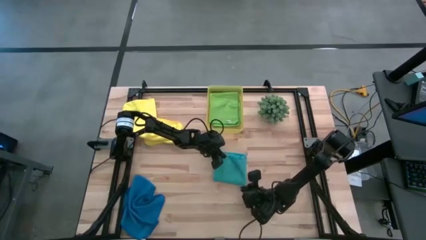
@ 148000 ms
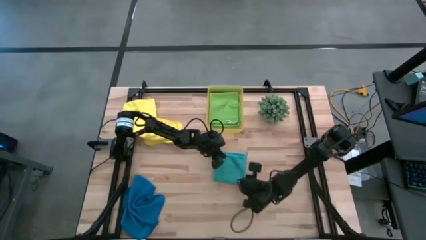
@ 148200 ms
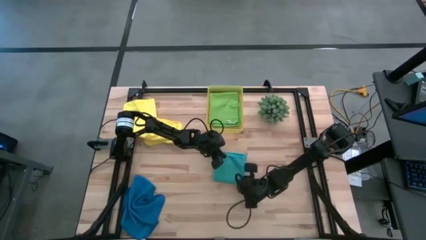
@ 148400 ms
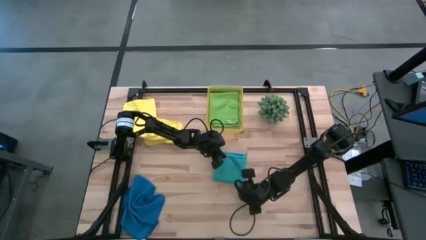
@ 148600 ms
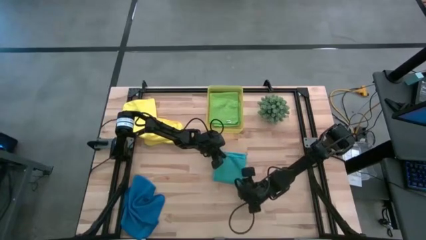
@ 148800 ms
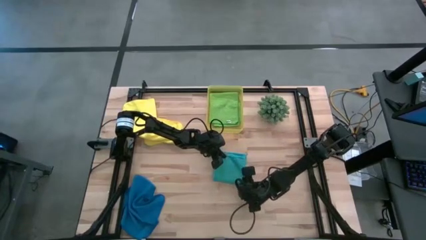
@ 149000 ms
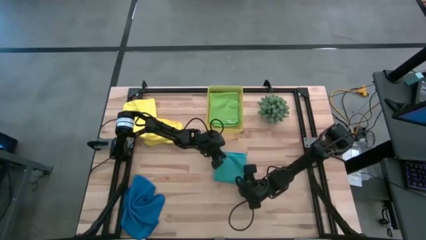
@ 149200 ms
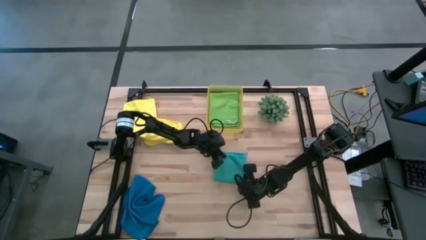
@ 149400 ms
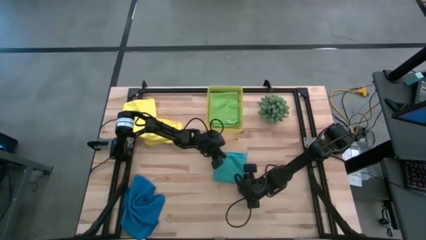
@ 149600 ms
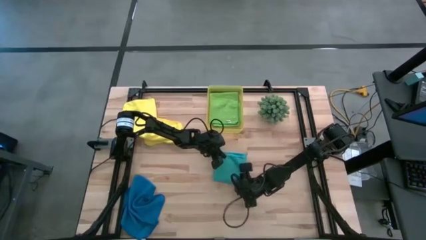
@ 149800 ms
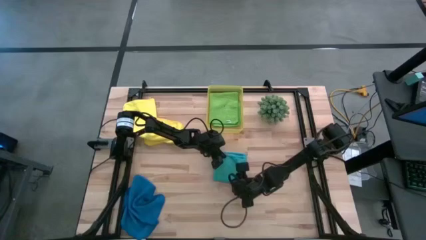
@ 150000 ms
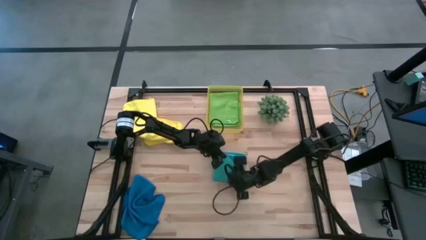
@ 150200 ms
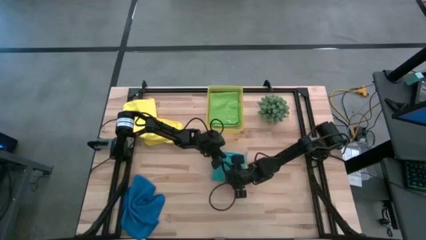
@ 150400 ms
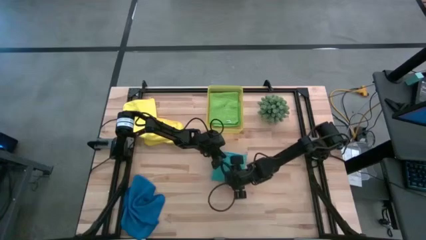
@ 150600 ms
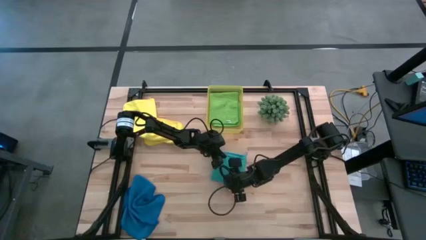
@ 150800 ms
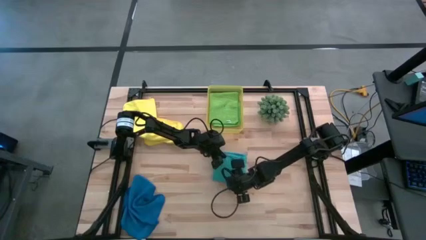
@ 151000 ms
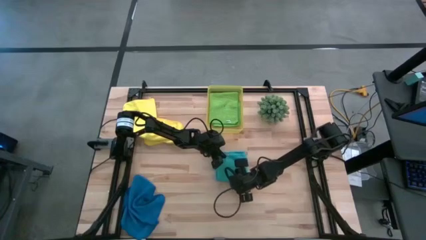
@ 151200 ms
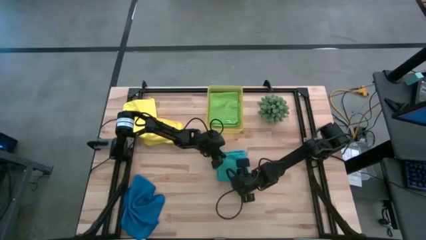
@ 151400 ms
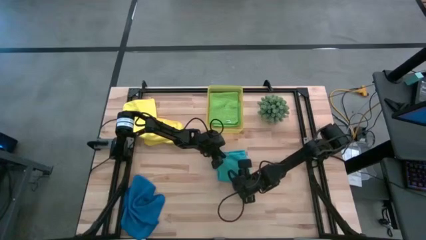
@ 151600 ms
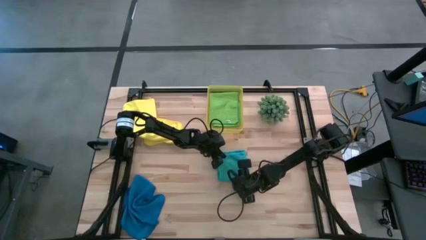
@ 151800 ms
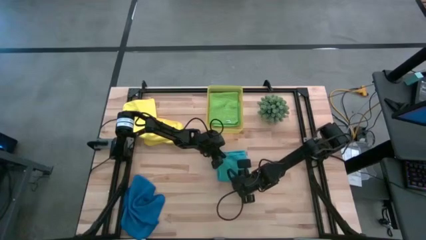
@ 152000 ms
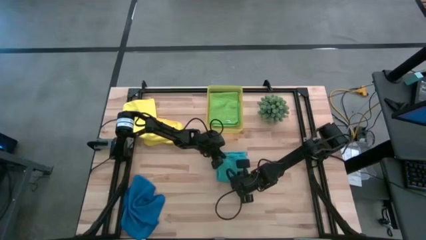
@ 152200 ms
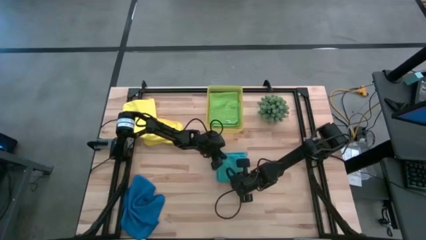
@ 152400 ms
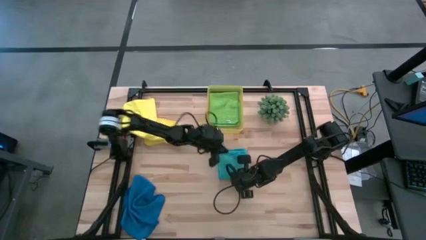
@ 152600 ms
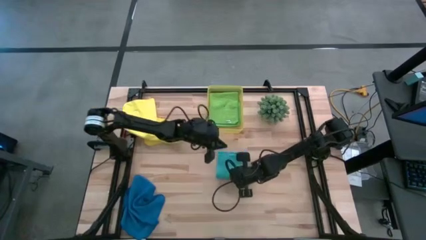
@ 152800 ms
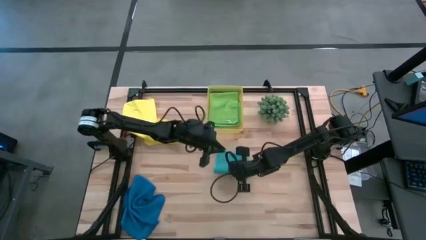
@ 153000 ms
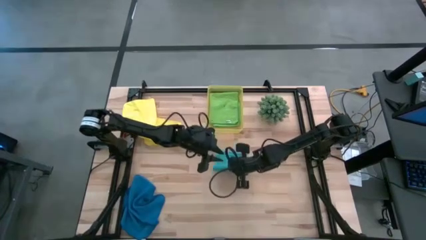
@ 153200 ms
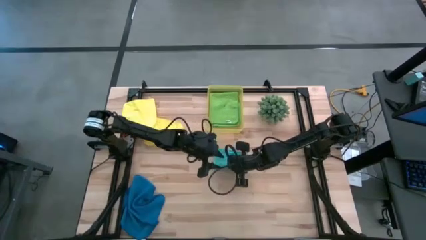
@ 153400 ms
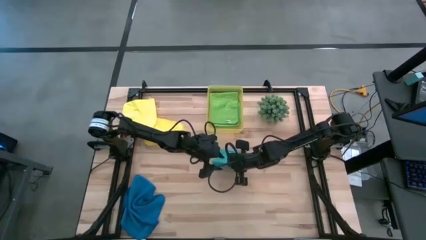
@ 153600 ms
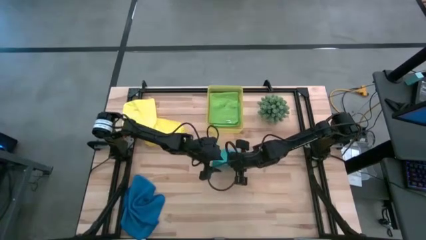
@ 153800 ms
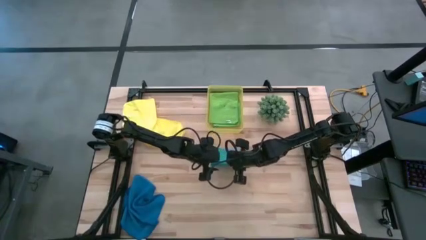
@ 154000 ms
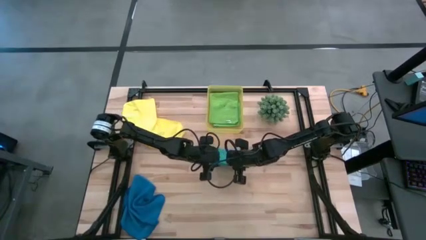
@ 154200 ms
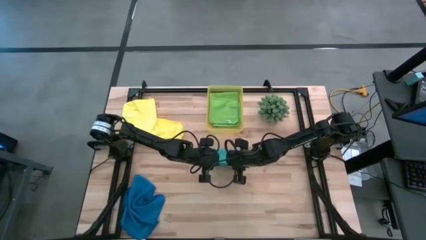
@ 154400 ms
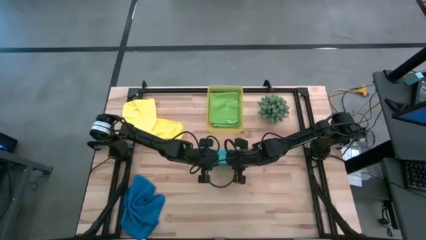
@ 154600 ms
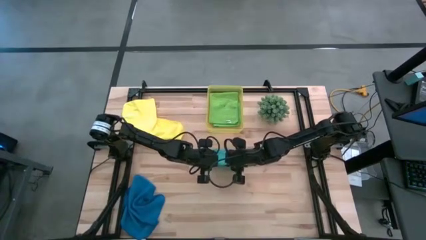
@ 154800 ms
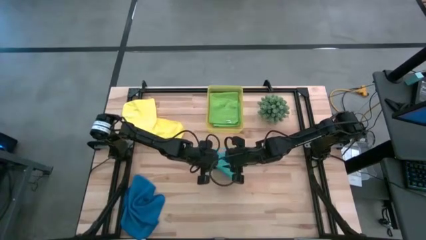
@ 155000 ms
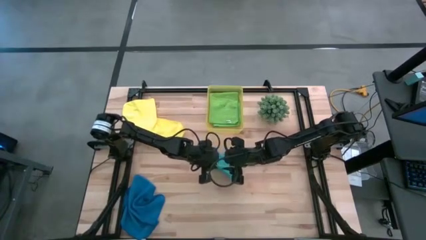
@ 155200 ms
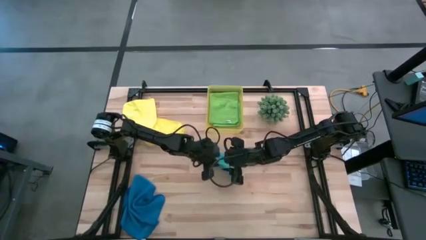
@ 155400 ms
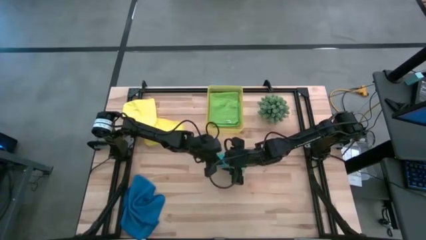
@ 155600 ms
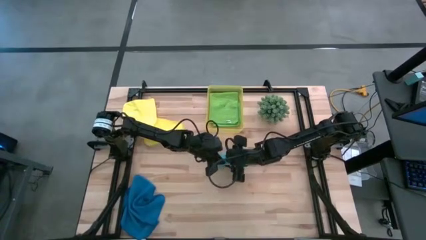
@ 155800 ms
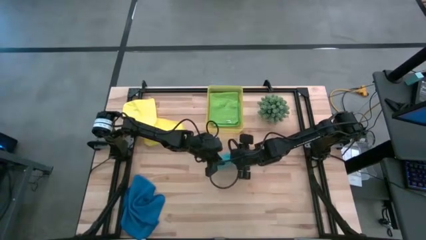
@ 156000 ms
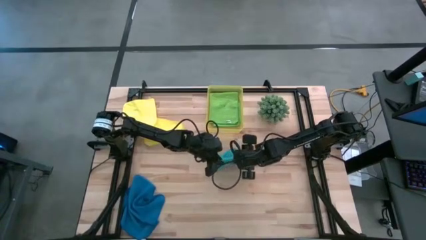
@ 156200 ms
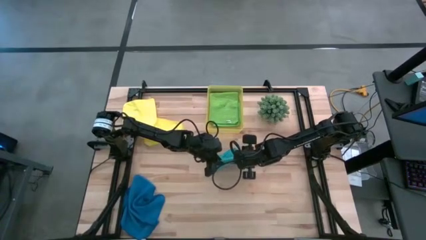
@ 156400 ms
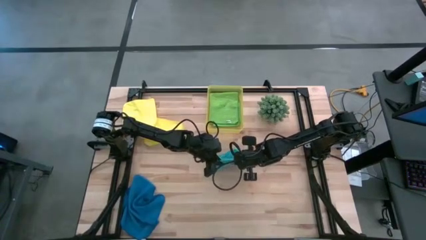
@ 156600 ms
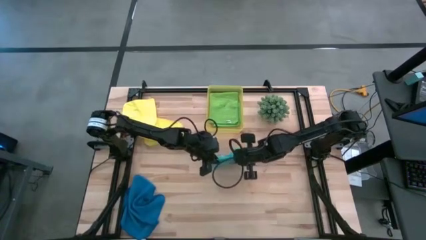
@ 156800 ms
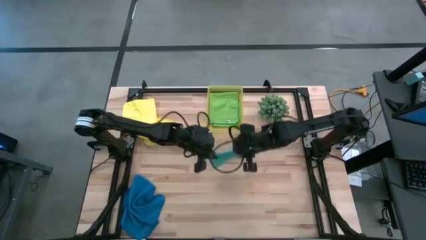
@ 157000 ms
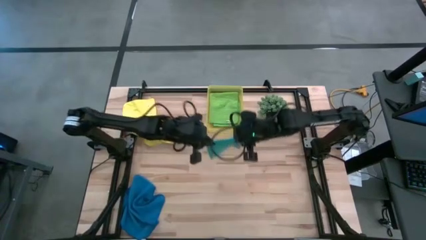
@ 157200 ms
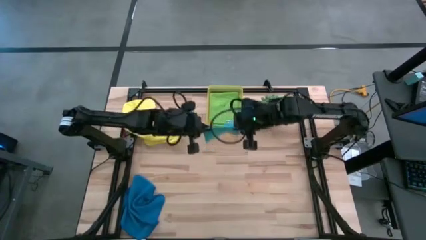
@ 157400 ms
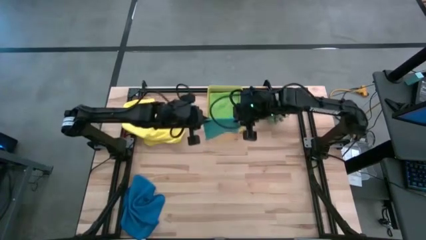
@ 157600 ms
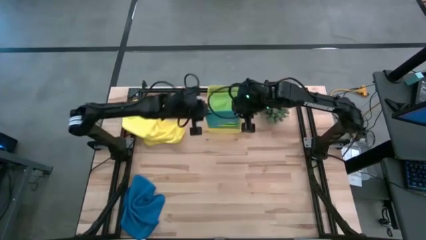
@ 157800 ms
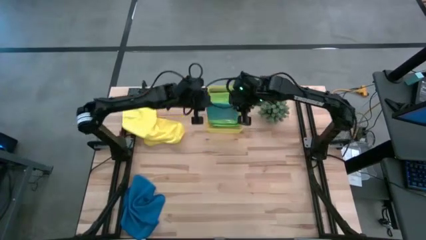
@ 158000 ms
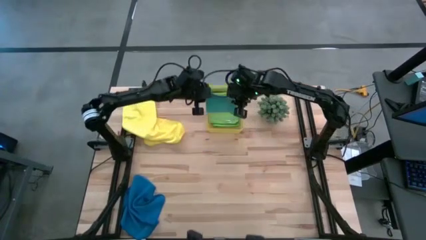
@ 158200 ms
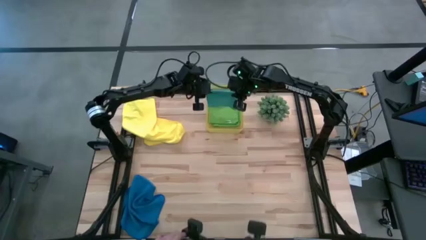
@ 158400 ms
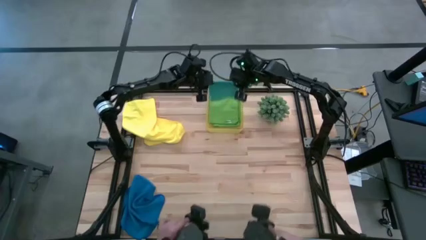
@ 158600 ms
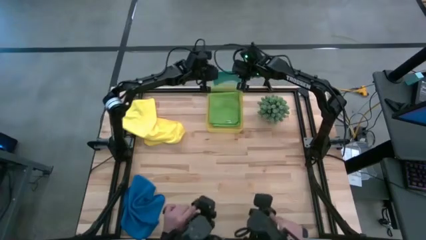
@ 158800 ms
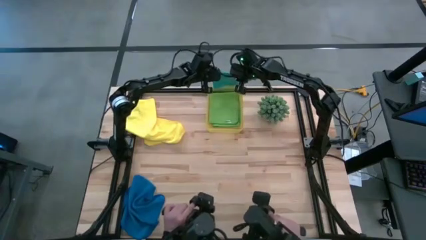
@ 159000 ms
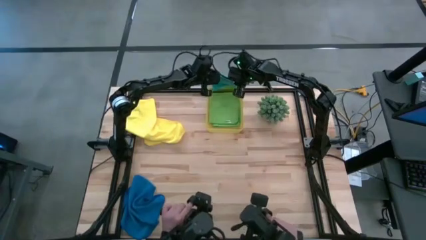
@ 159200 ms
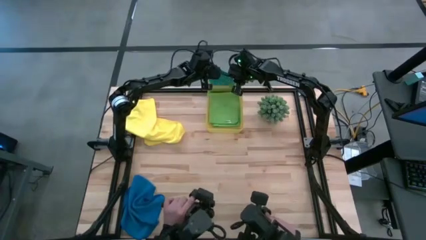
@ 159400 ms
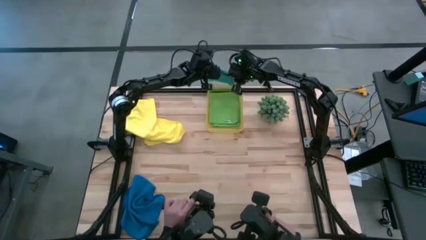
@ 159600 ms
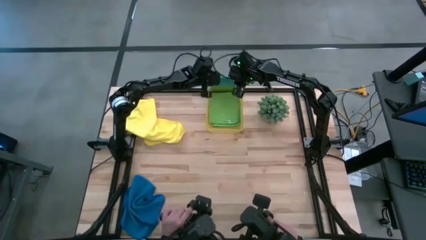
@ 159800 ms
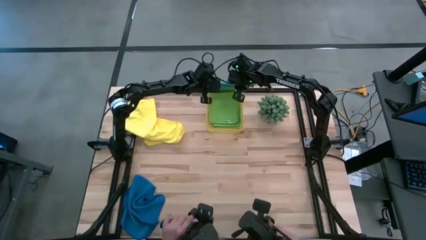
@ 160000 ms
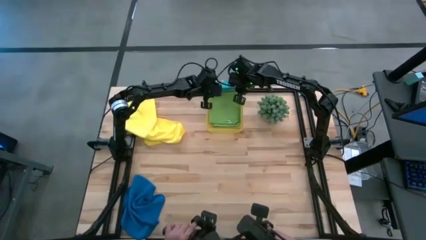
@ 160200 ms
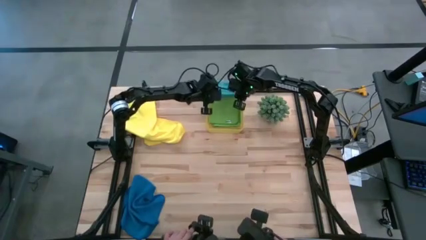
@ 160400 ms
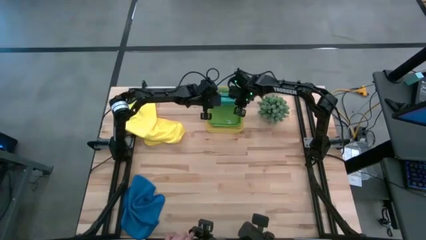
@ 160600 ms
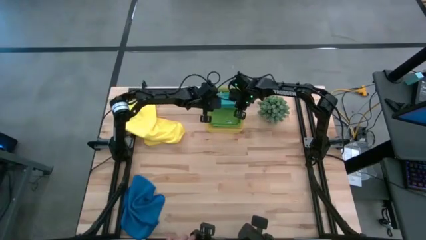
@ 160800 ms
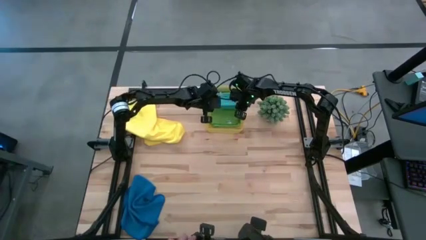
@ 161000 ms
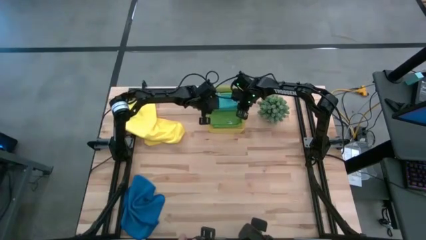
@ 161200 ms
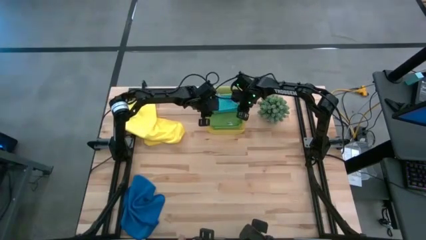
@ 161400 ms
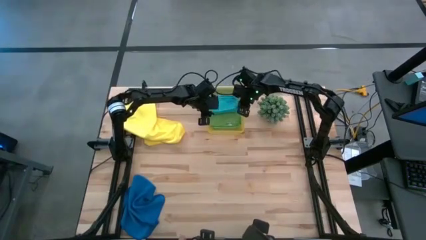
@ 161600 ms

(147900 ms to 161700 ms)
Task: Fold microfiber towels
Put the light blue microfiber cloth into the yellow bin

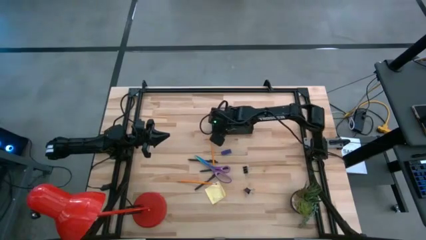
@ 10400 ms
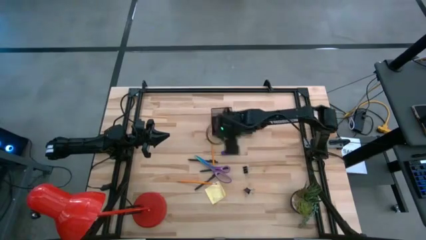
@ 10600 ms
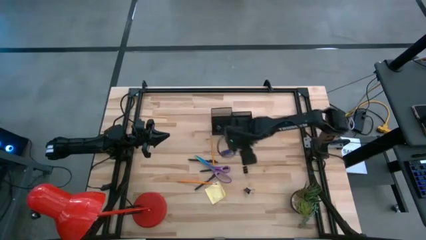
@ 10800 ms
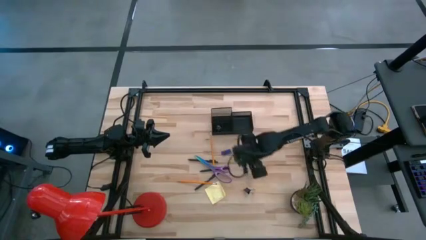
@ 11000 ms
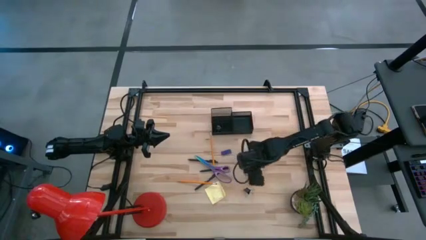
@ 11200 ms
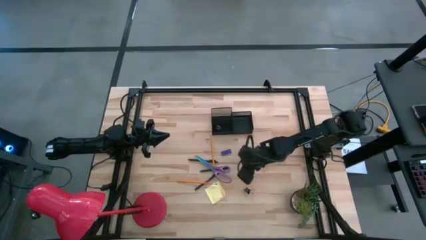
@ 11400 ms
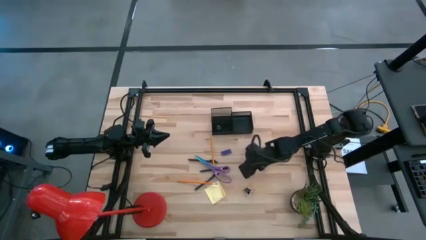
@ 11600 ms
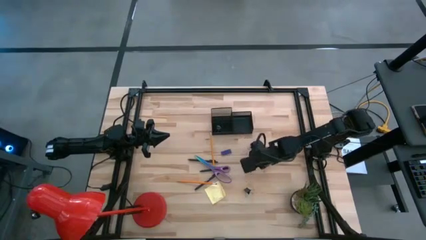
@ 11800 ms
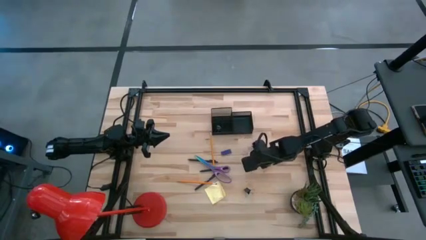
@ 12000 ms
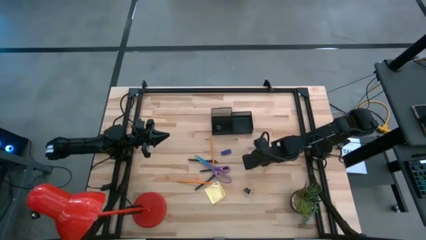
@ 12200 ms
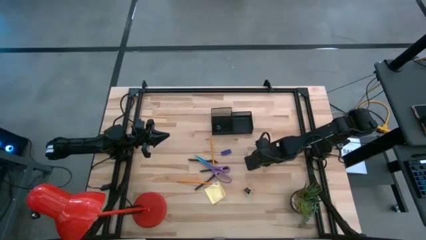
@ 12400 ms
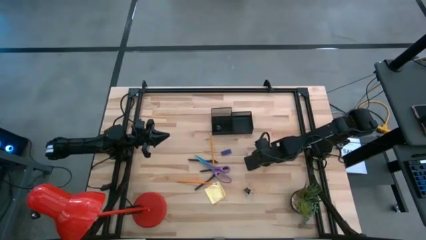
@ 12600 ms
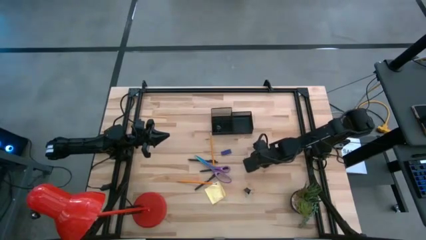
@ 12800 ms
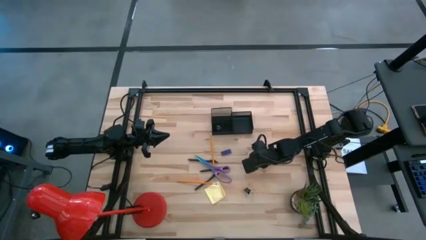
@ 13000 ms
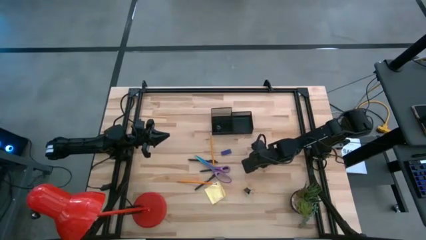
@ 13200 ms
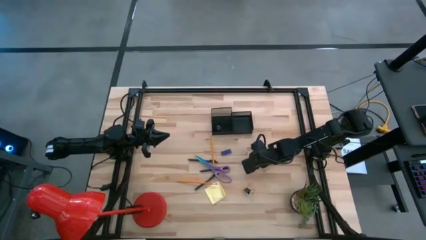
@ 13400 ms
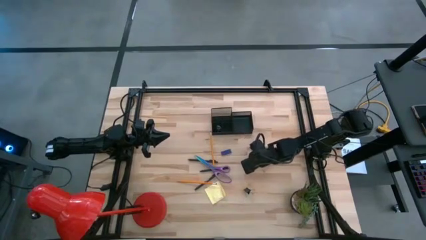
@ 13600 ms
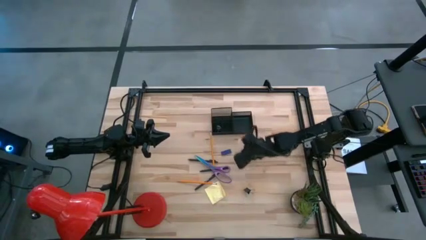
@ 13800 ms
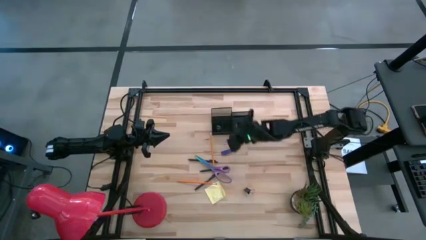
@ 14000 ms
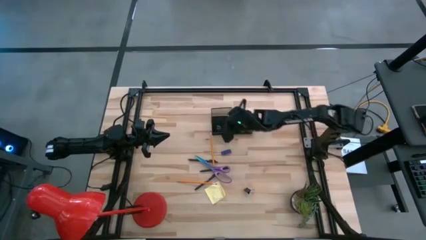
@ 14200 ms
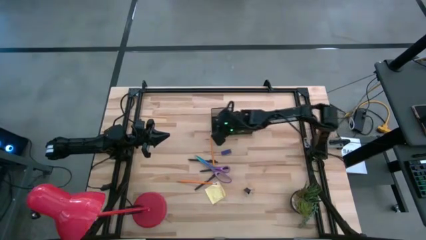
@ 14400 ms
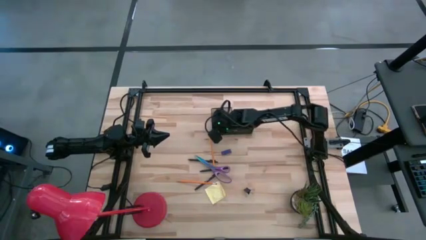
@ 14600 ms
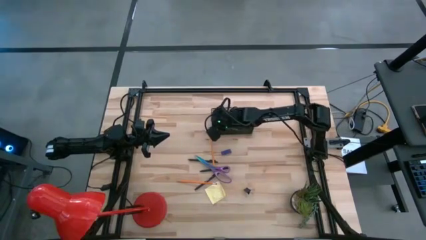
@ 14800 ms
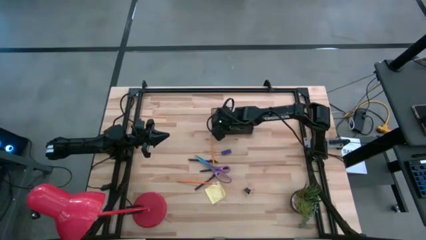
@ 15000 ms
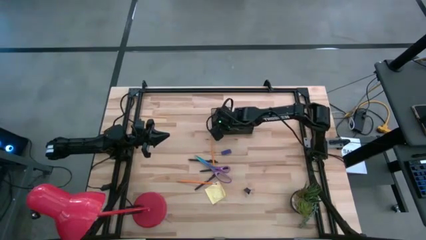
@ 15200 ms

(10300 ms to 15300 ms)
Task: Pick and place office supplies into organizer
Put the top black binder clip into the desk organizer
